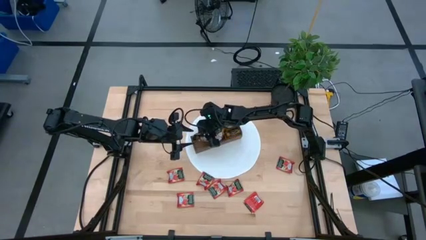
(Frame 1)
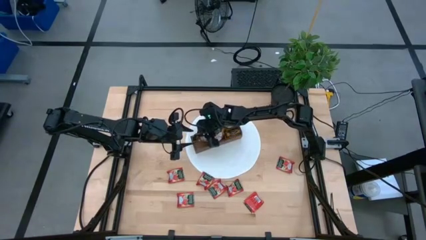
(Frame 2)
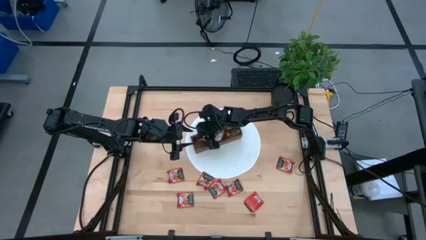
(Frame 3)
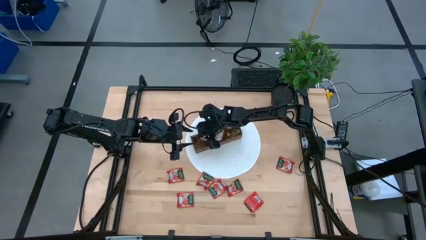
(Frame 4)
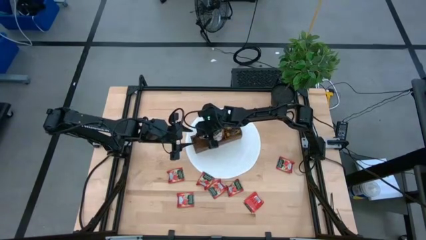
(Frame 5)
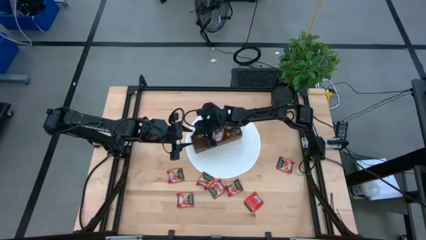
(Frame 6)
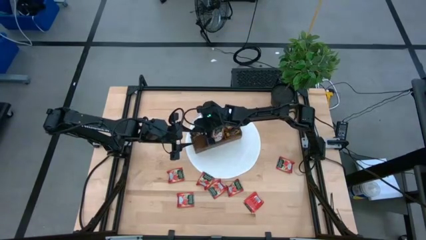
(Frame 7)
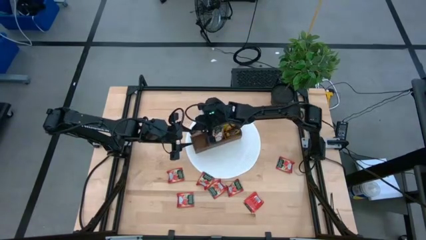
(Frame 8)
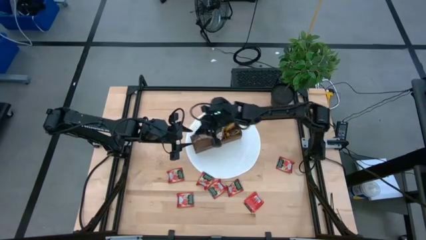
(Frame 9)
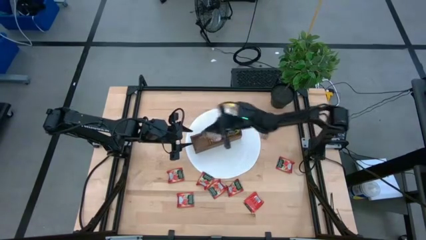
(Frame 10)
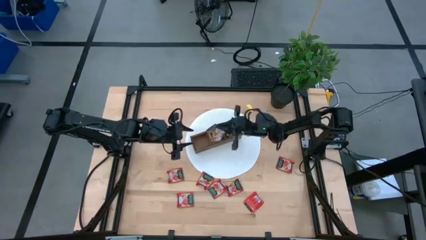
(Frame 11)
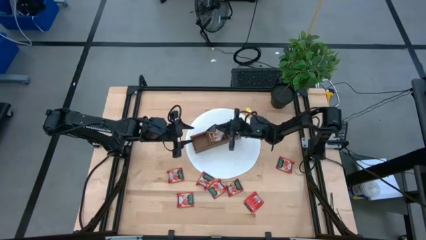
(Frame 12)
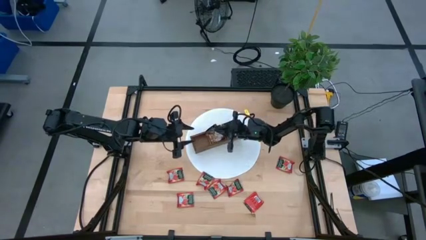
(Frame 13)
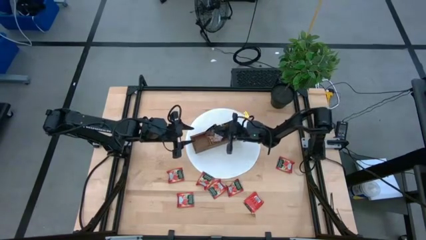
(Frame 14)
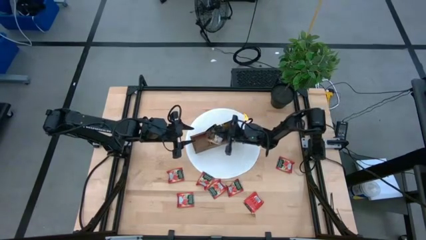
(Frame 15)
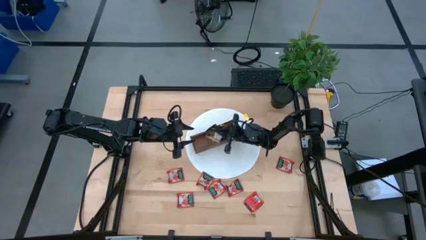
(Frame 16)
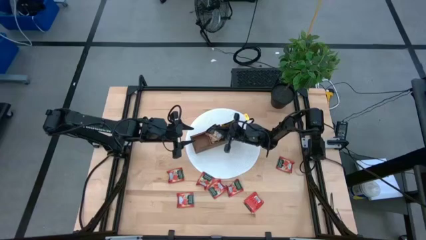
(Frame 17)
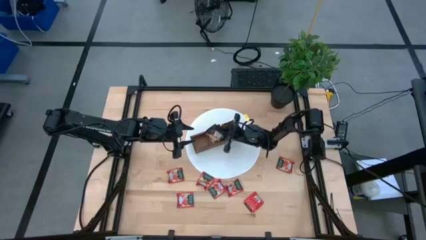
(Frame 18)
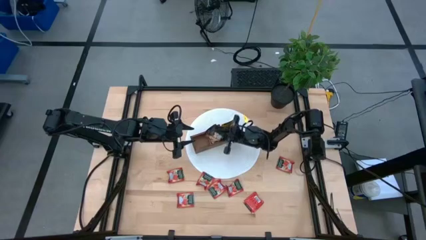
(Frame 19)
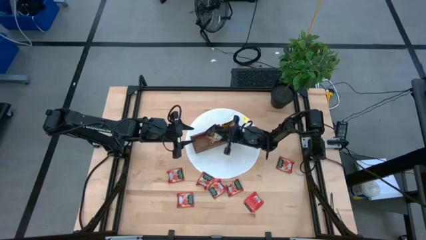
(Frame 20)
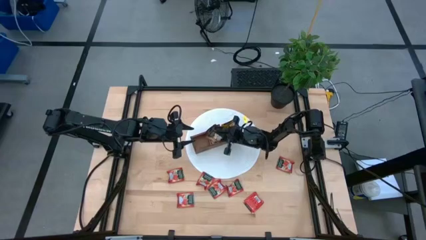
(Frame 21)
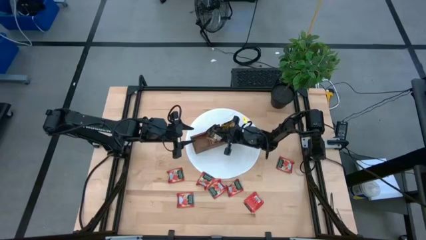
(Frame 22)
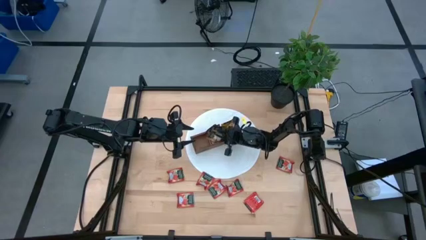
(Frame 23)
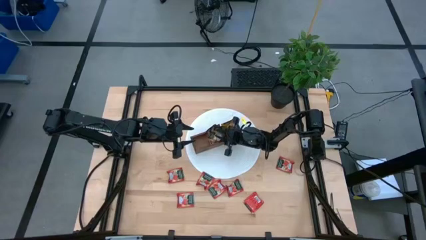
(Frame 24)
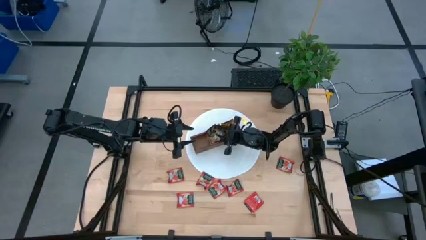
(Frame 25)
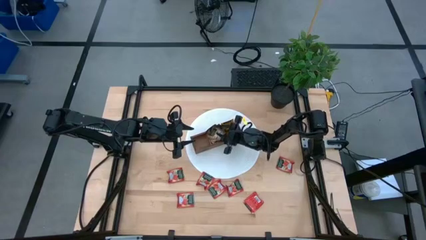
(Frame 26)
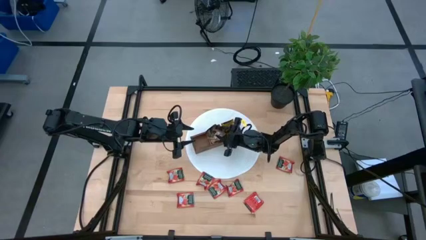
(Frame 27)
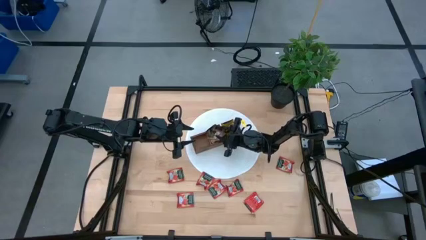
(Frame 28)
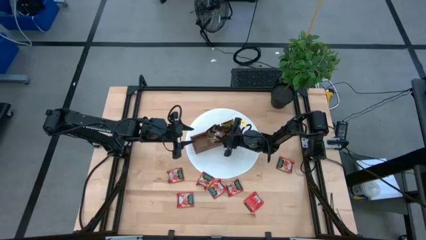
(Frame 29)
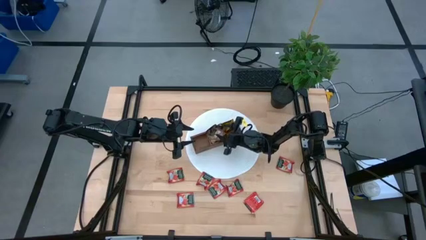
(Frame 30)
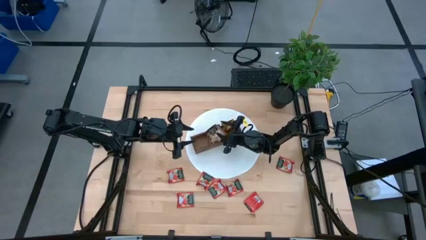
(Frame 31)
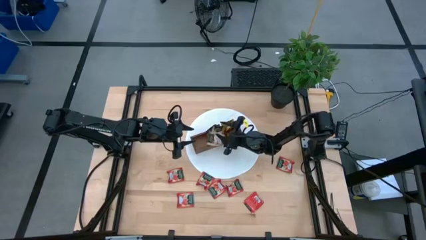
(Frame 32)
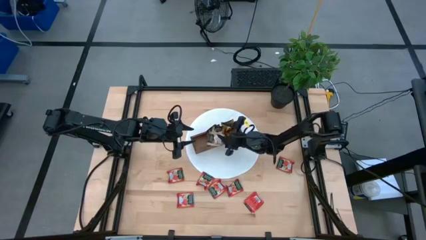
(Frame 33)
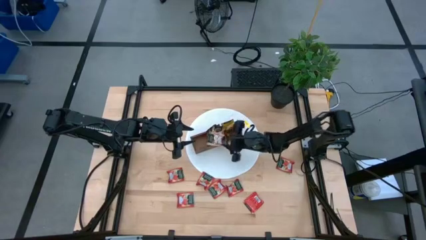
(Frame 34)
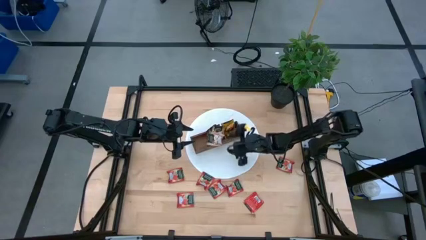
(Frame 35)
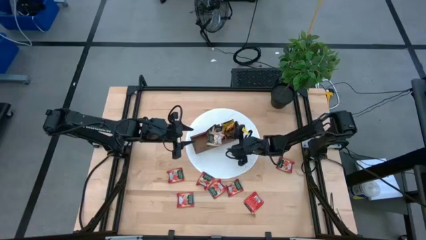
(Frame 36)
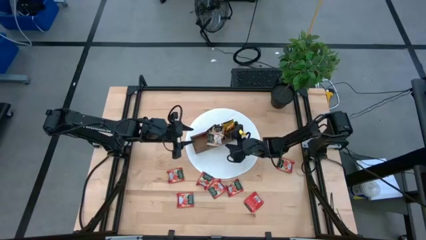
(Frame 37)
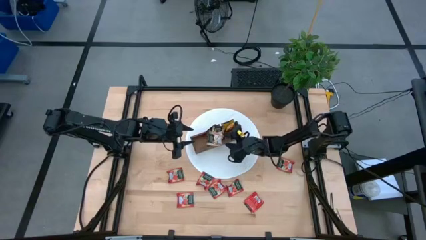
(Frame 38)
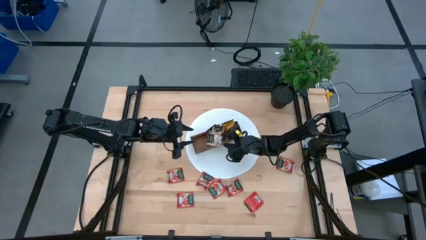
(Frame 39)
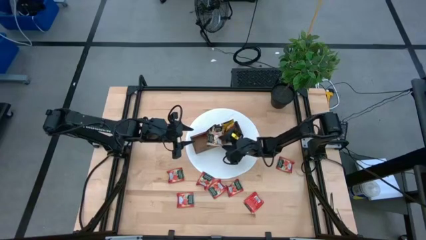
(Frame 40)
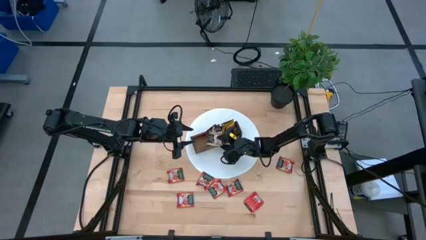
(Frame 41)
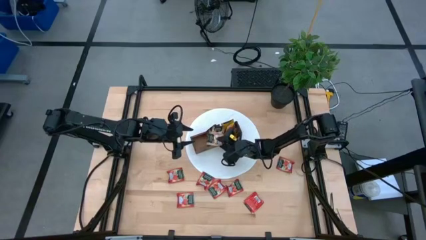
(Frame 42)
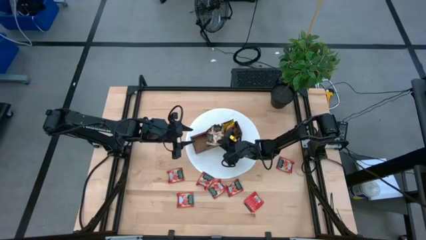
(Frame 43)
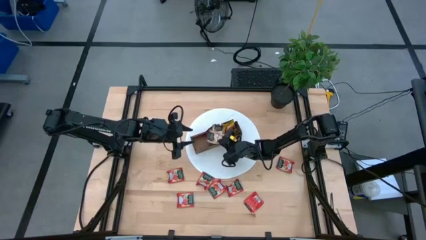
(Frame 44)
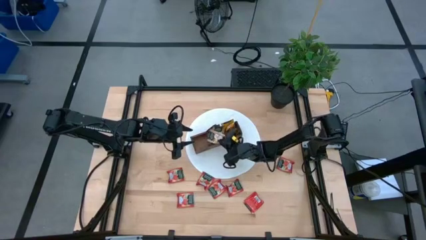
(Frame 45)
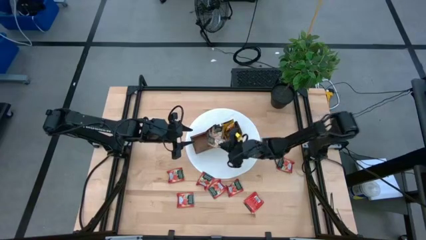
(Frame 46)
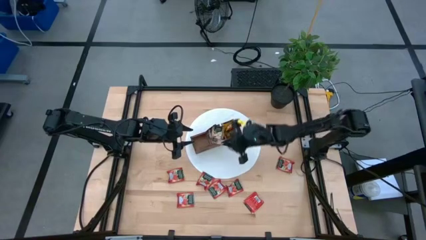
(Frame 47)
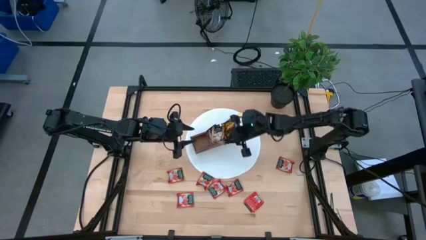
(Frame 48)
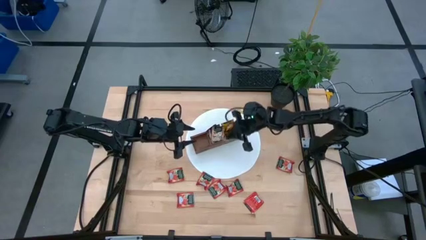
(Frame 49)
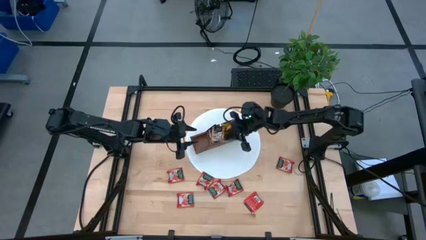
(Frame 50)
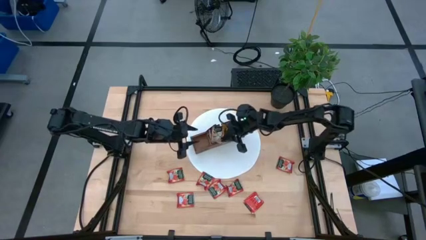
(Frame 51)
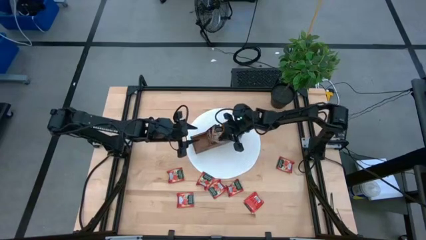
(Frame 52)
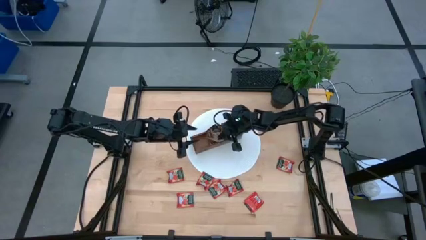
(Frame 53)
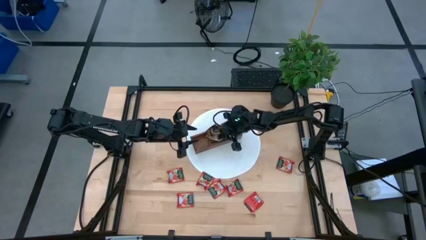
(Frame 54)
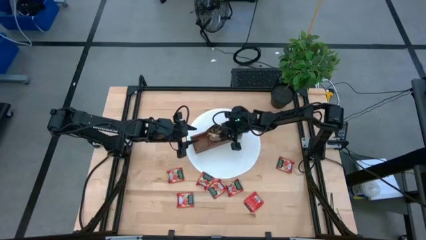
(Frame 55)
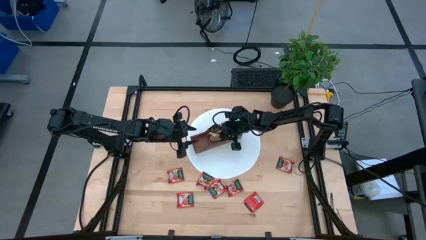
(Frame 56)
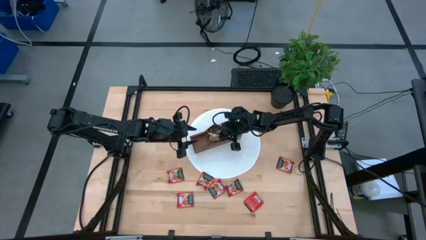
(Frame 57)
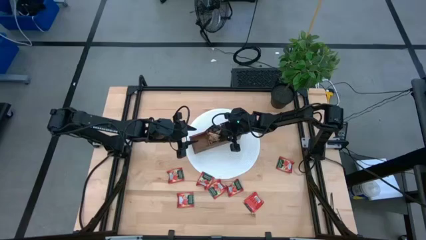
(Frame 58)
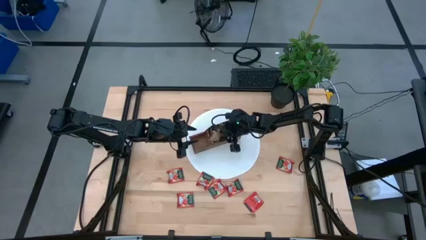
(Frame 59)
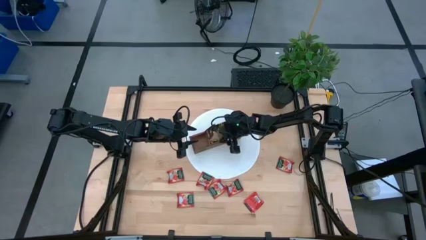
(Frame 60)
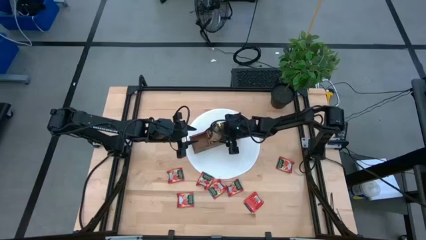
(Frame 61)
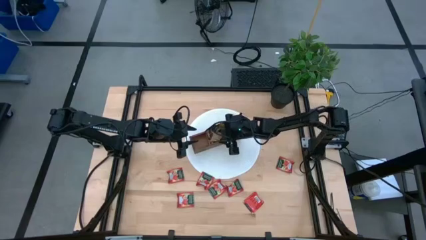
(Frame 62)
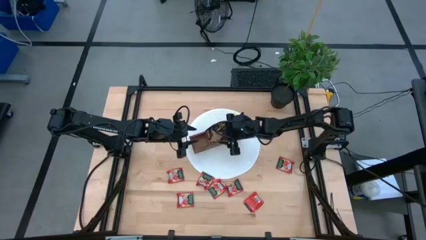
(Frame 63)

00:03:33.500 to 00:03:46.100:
Task: Pick & Place Tea
Put the brown tea bag into the middle section of the wooden organizer

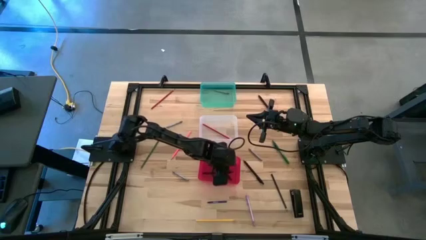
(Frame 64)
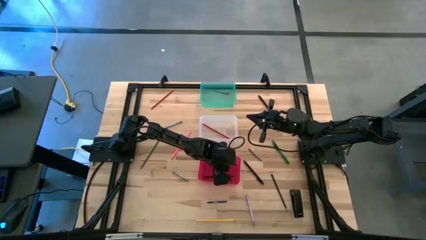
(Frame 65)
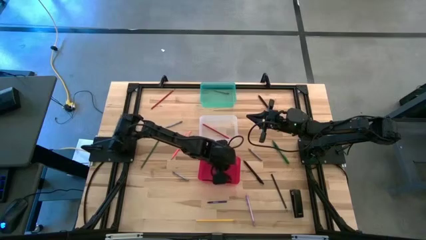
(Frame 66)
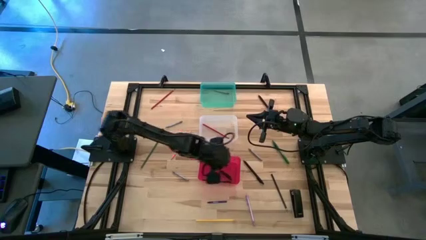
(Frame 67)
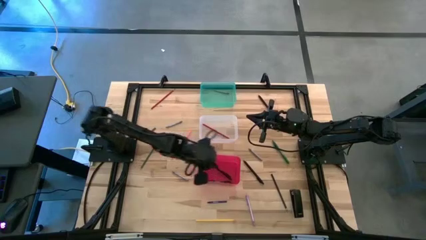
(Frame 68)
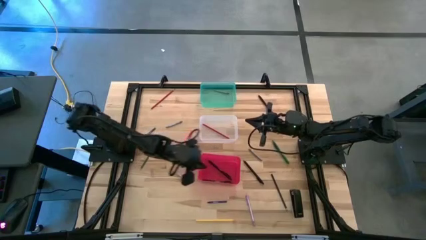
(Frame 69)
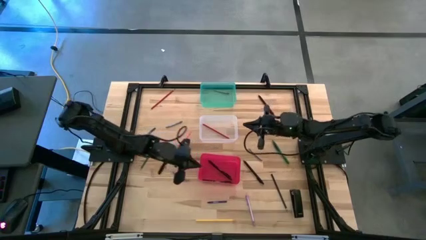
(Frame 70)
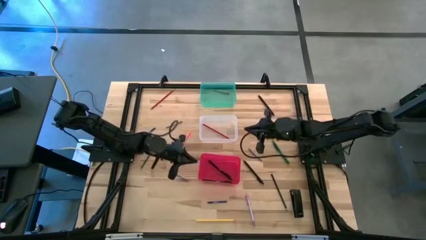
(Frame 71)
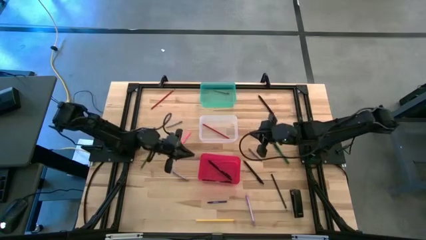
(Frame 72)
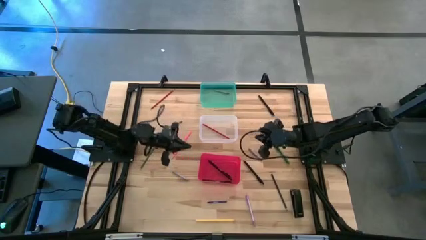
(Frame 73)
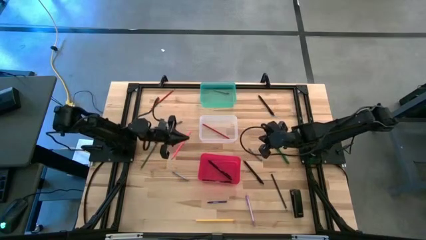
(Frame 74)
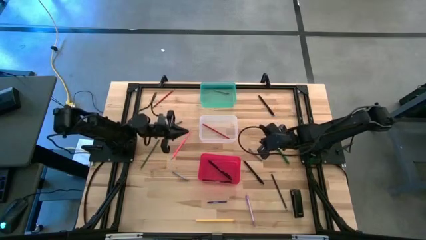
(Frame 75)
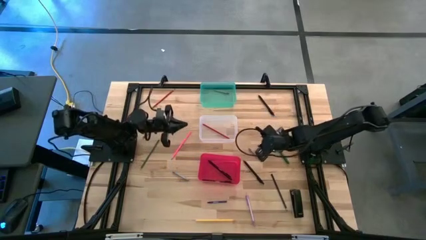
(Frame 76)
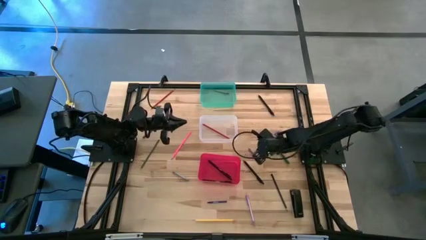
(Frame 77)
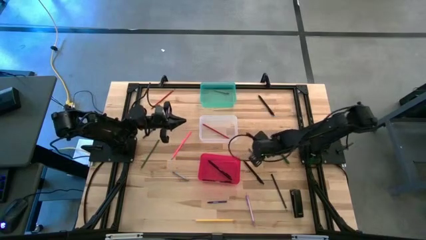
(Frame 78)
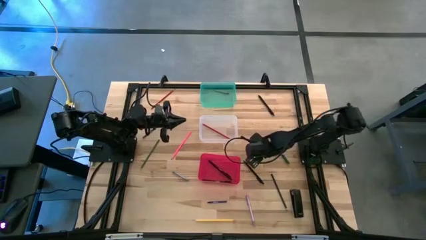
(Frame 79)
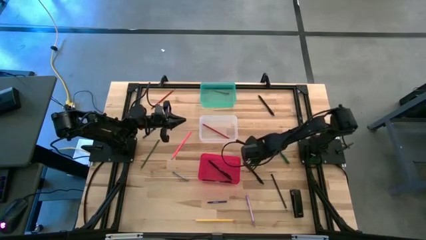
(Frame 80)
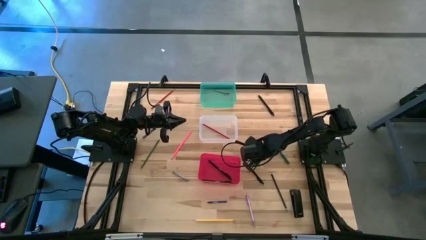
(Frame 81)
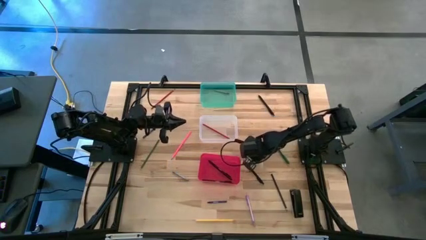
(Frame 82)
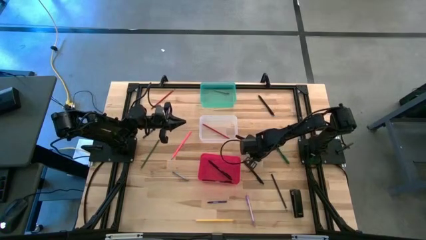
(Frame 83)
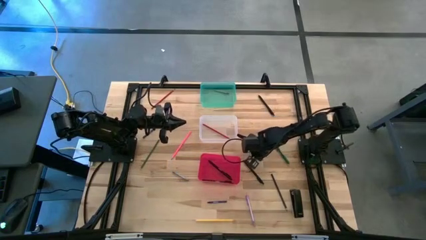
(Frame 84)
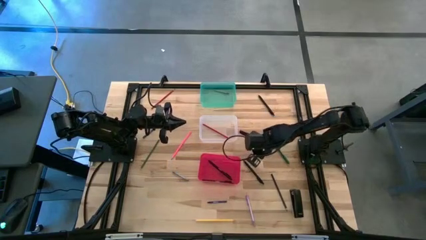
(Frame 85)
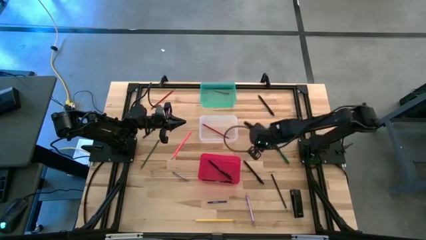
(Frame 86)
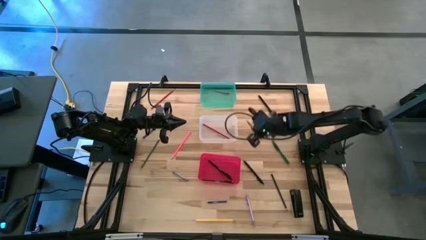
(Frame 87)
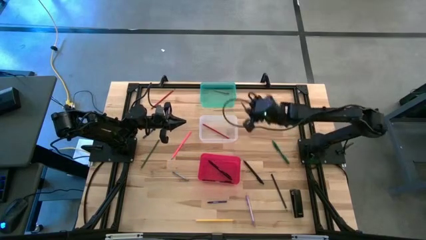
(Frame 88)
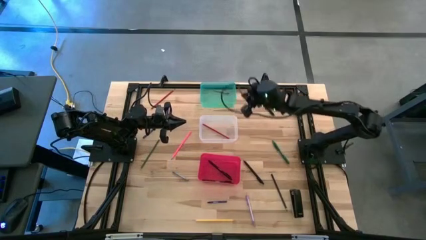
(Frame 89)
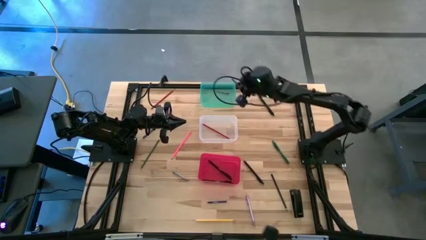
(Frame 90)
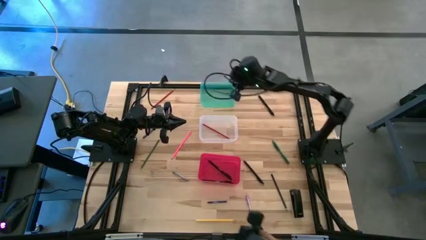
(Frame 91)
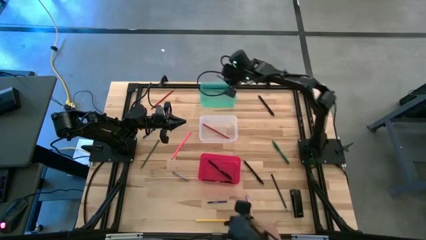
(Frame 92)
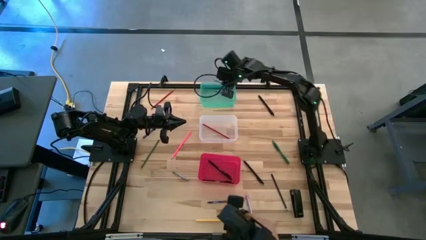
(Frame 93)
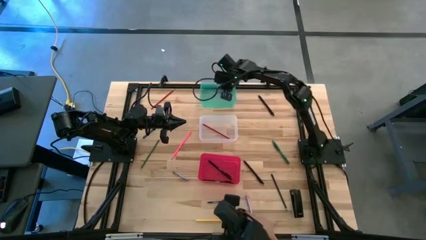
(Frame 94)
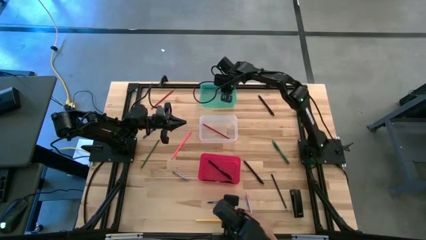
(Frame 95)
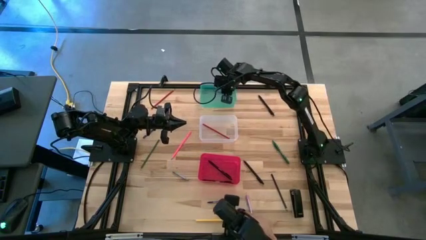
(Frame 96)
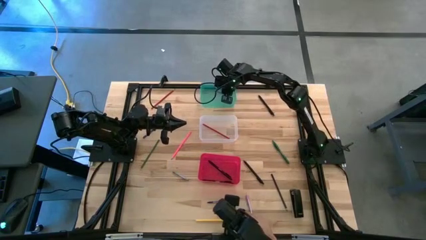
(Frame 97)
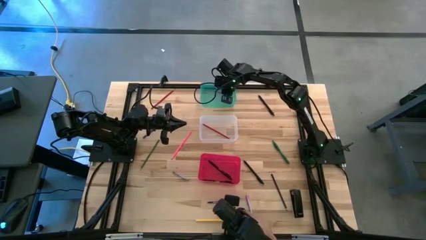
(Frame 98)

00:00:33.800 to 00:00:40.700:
Task: Sort crayons/erasers/pens/pencils in bins
Put the right gray crayon into the green bin
